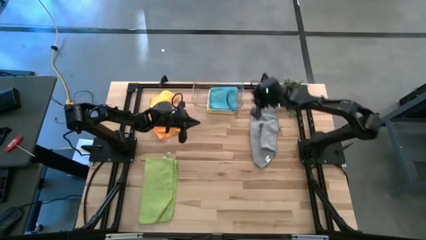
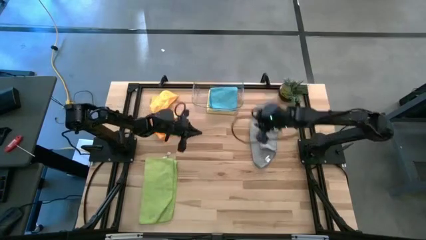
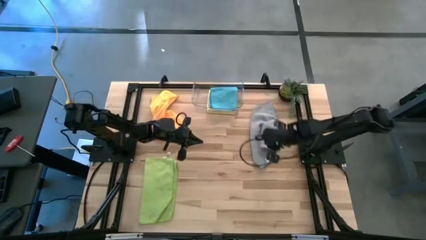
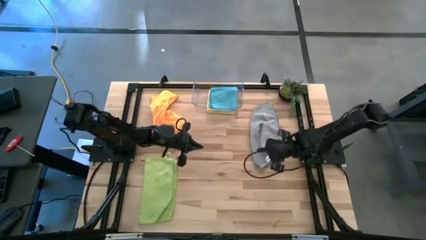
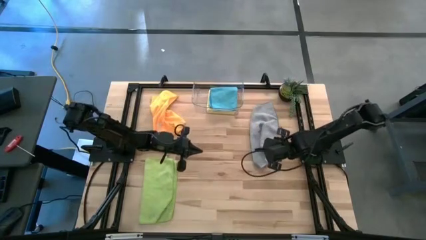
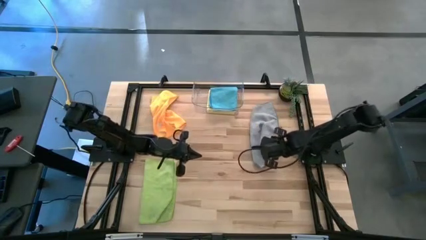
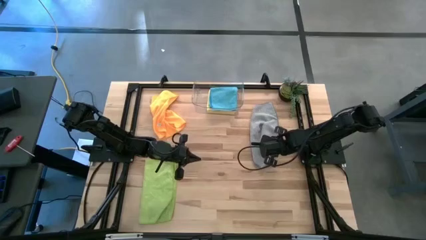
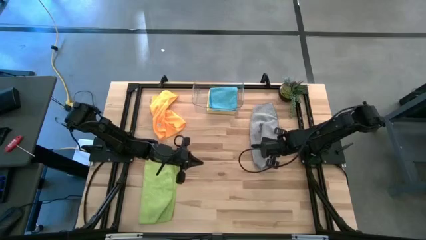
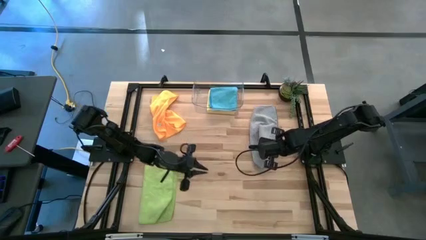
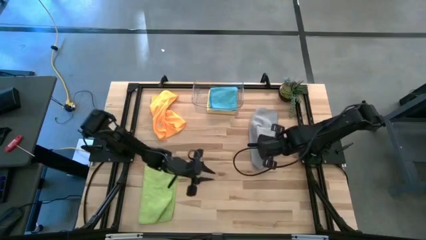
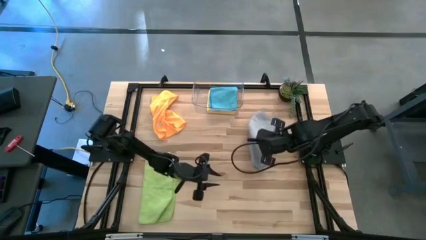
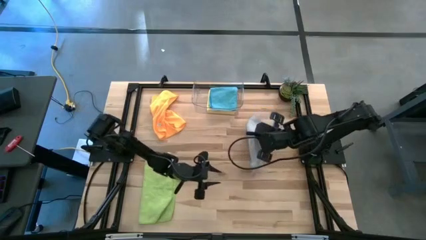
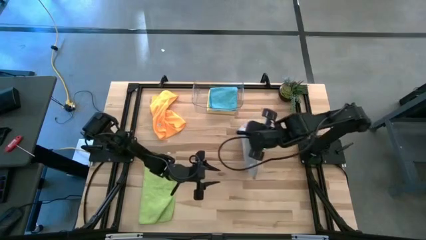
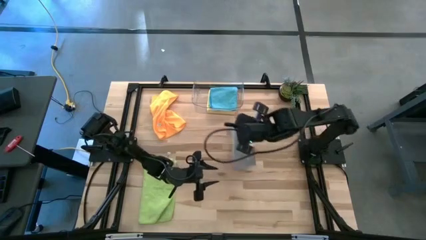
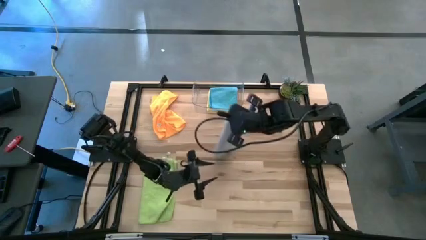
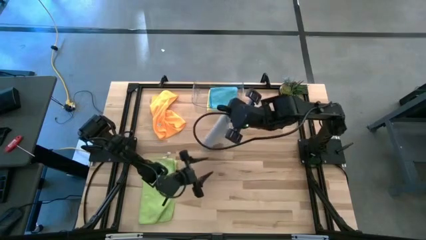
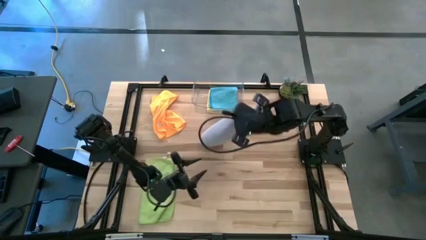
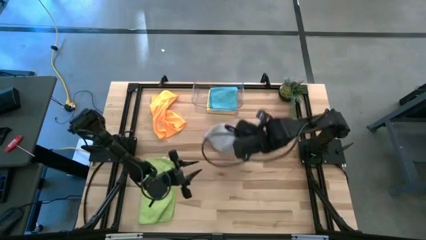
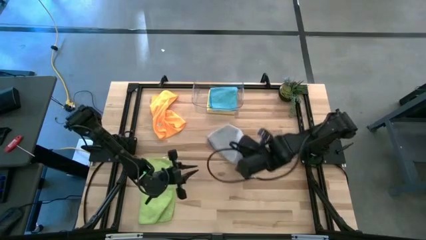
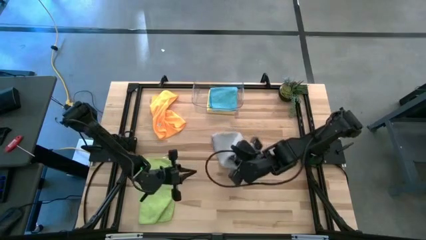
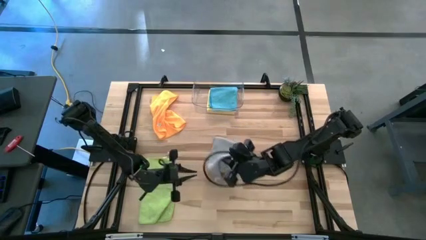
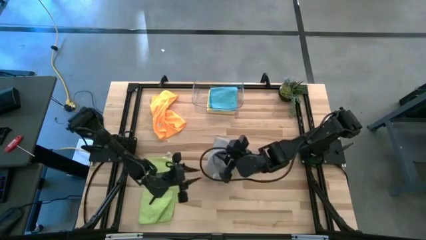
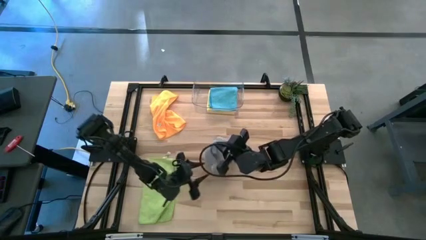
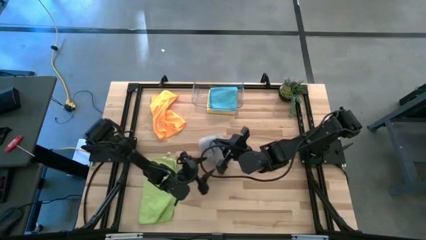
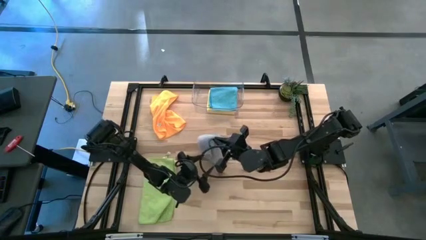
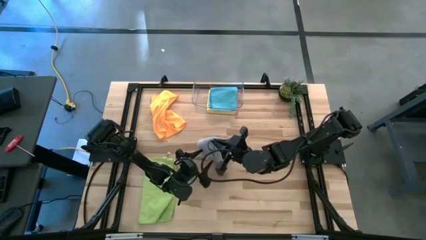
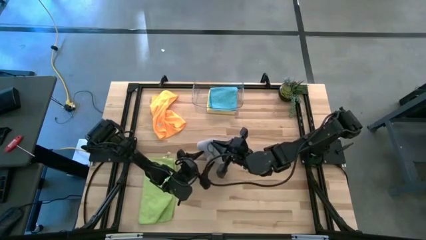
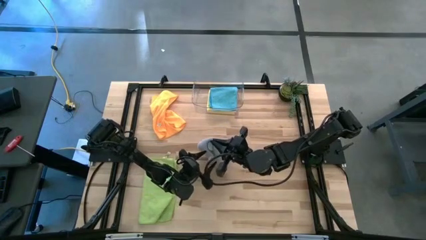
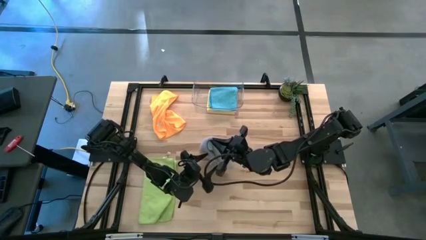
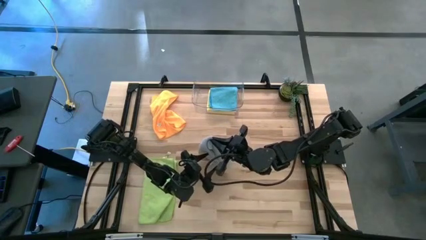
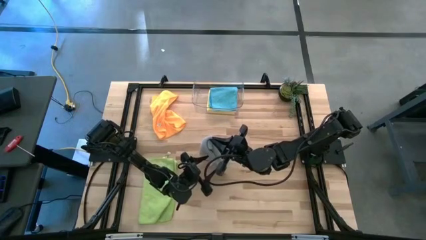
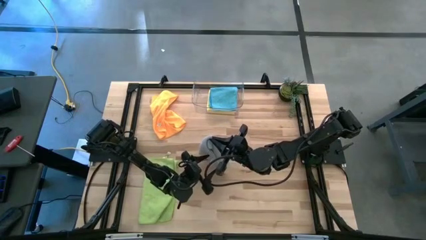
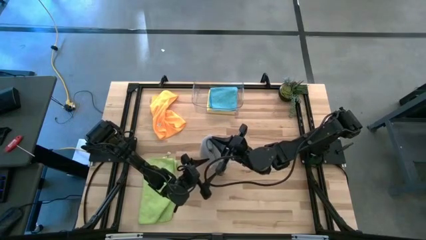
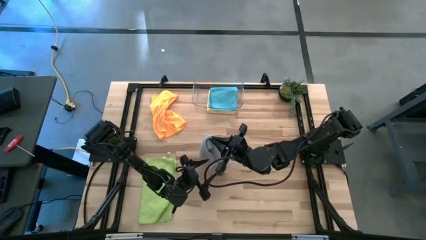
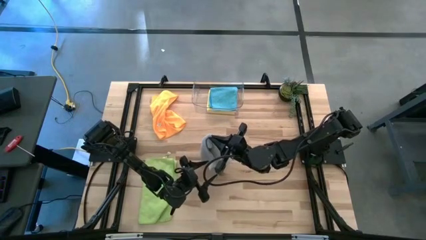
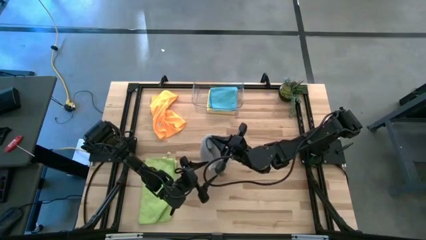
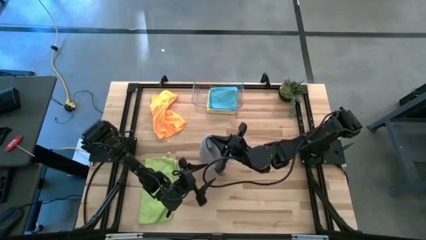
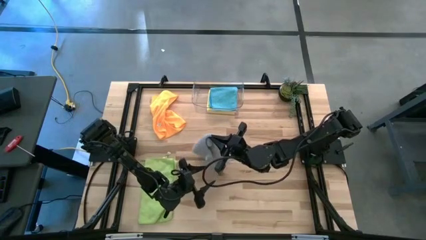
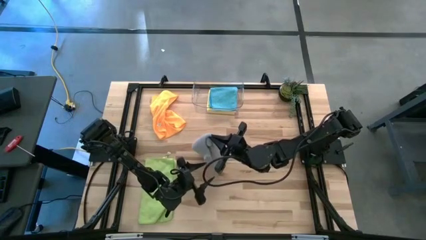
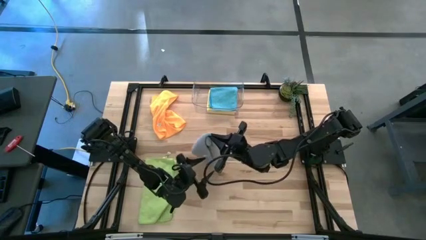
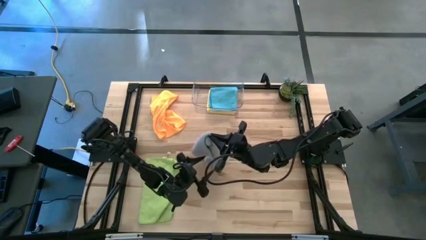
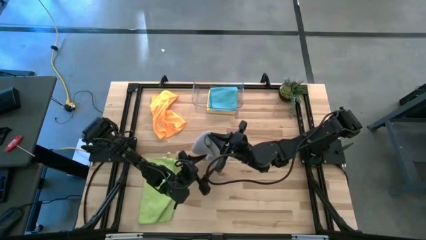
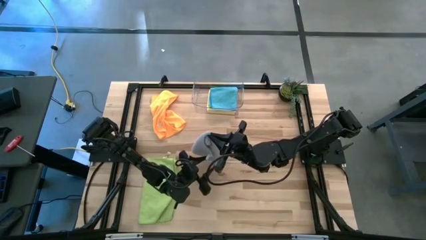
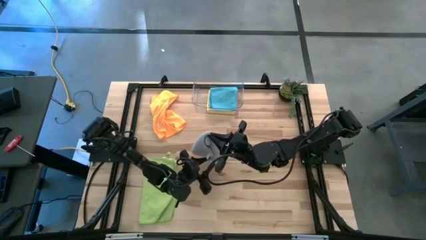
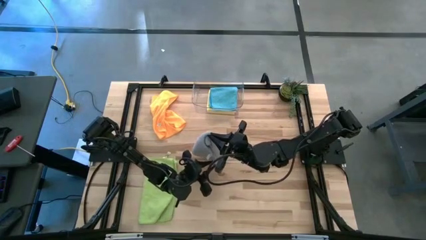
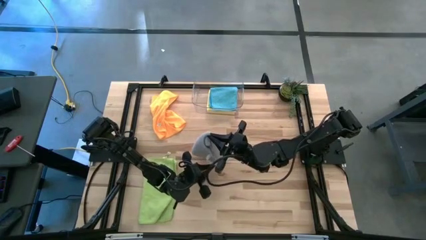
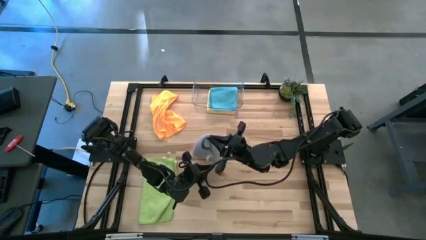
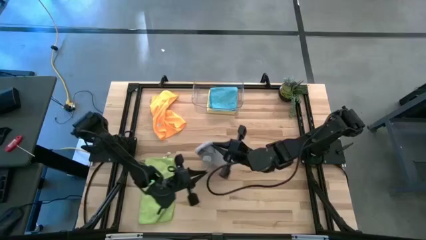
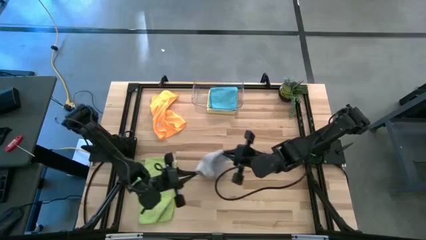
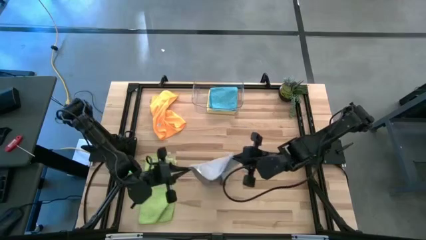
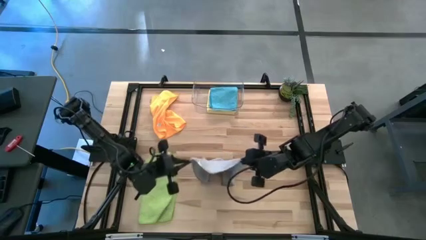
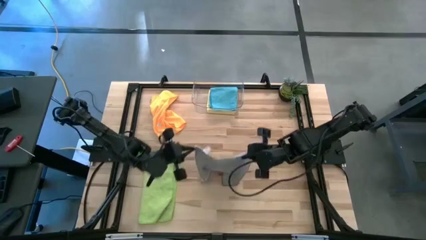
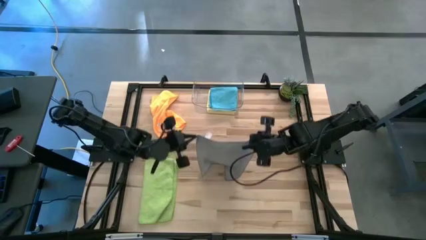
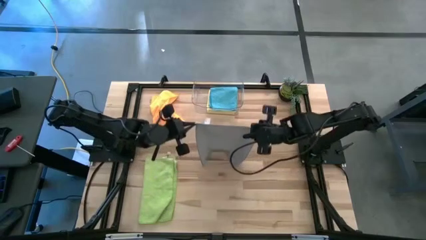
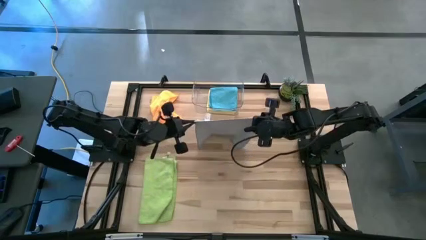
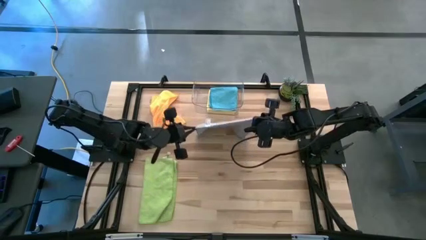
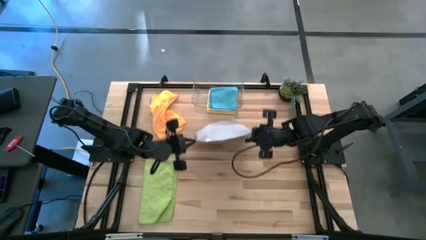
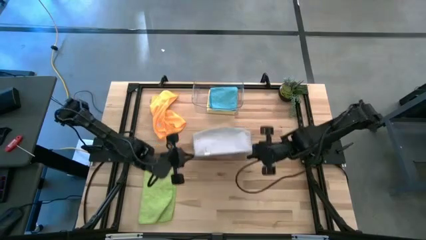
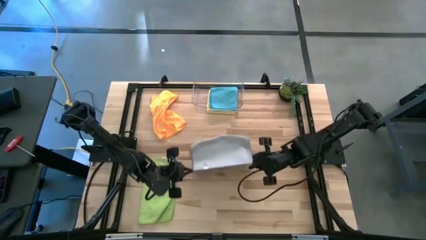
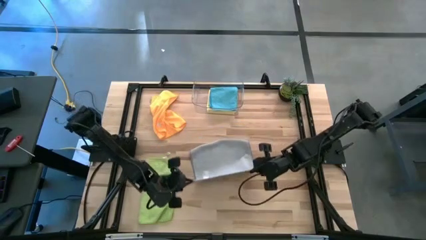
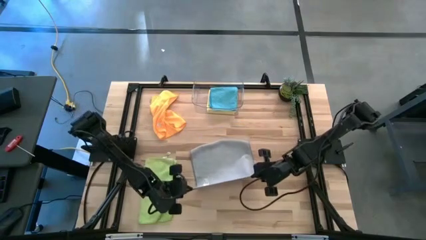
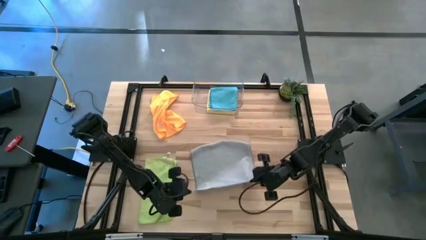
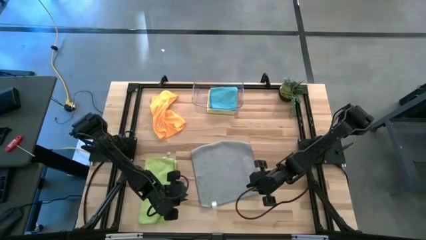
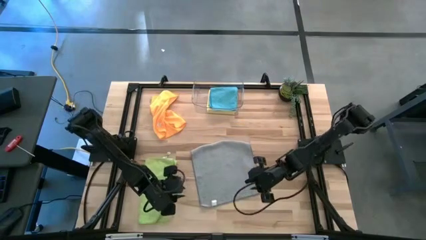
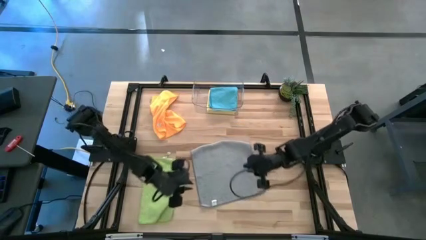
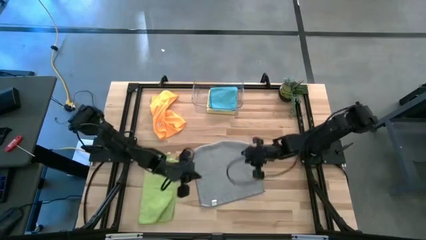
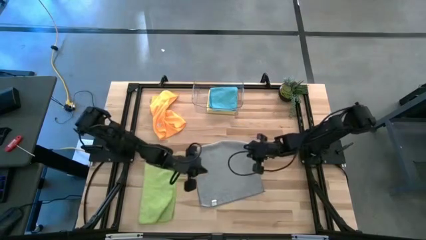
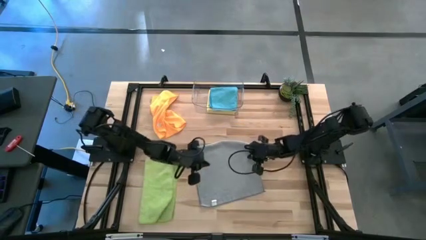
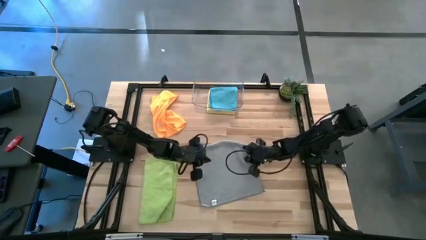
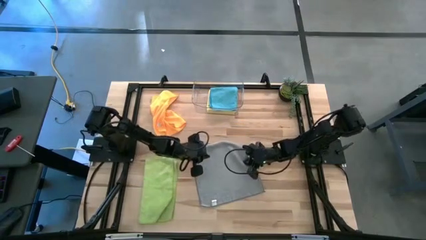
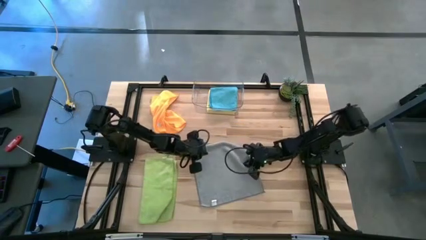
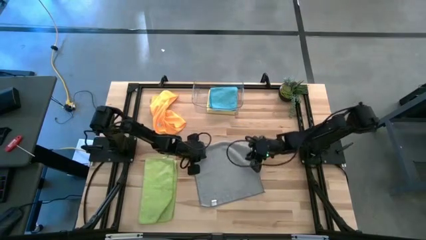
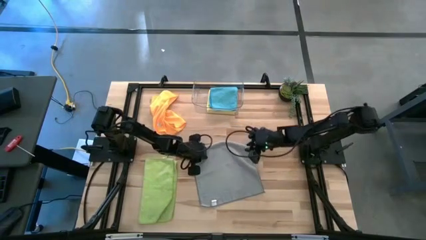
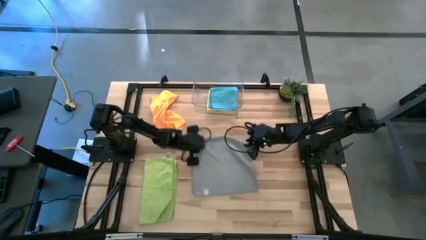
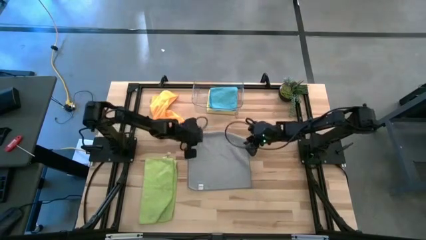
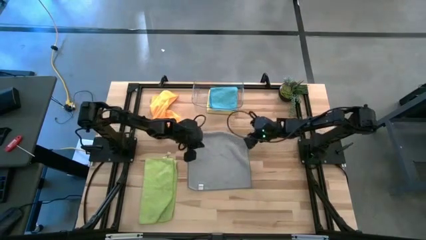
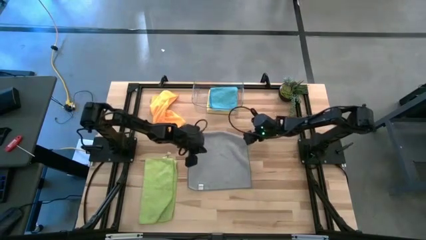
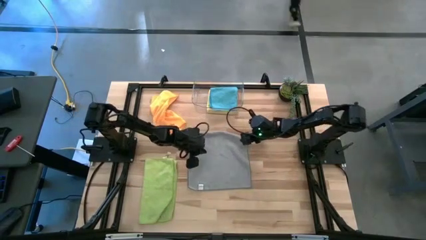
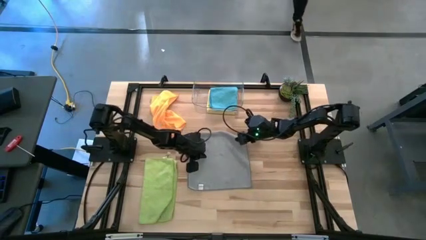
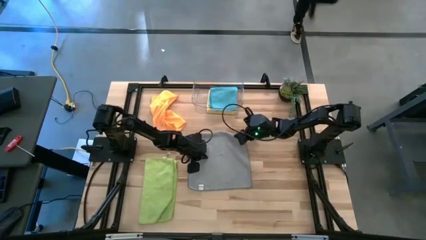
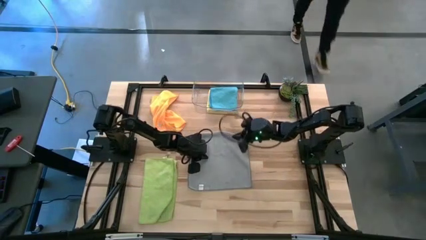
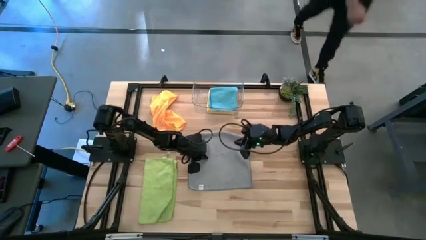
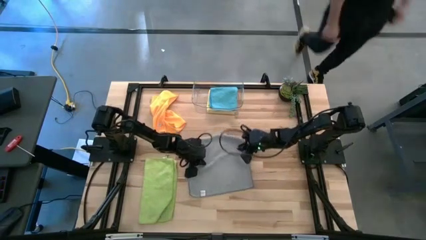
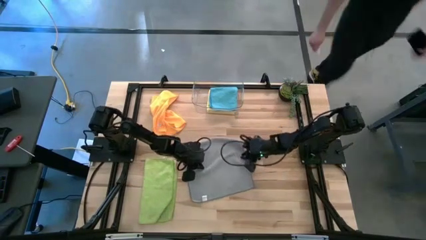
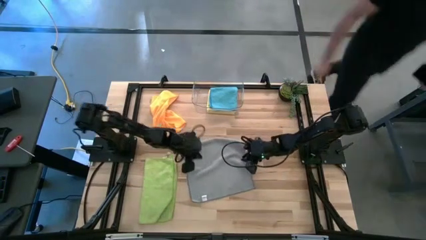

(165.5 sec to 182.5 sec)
Task: Fold microfiber towels
Fold the gray towel on the table
